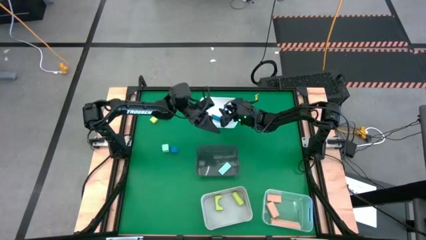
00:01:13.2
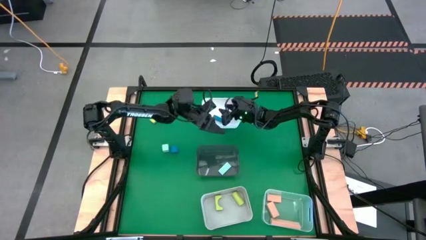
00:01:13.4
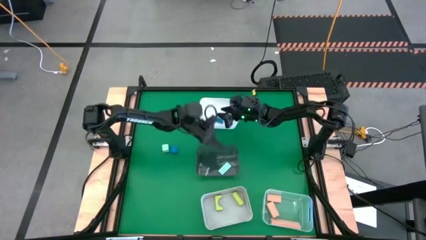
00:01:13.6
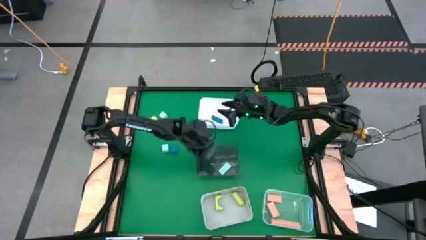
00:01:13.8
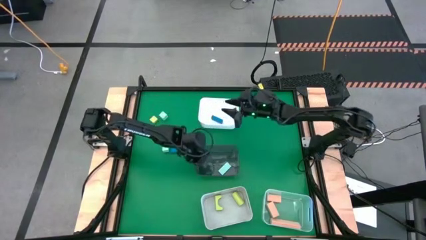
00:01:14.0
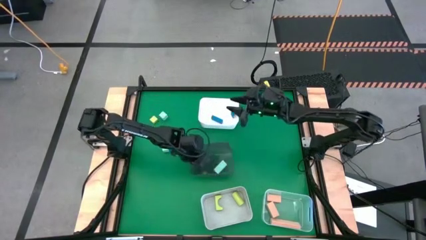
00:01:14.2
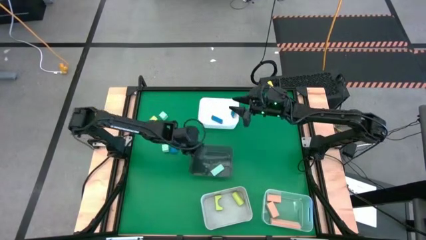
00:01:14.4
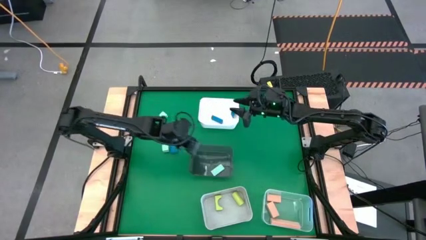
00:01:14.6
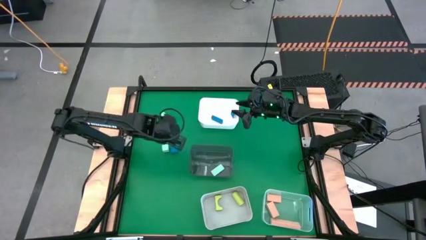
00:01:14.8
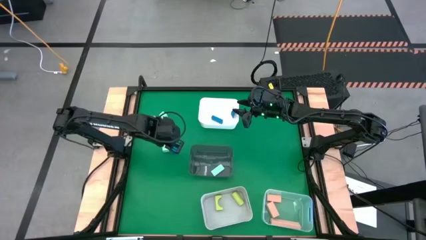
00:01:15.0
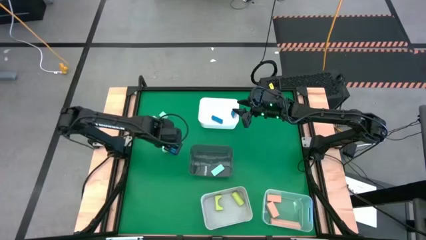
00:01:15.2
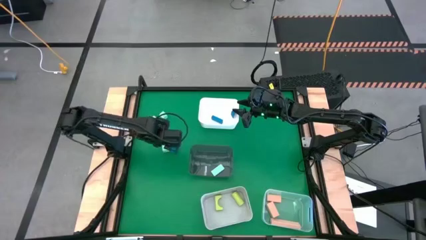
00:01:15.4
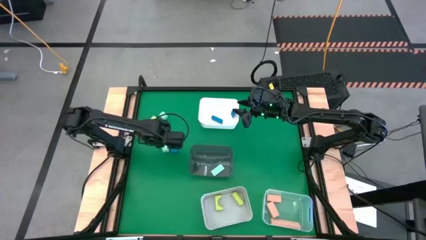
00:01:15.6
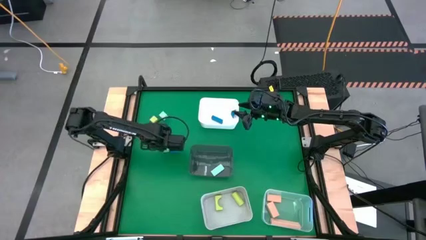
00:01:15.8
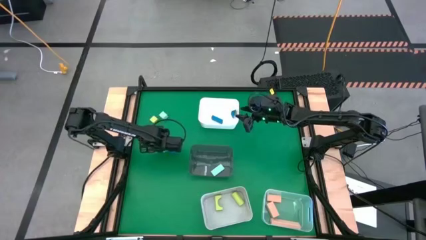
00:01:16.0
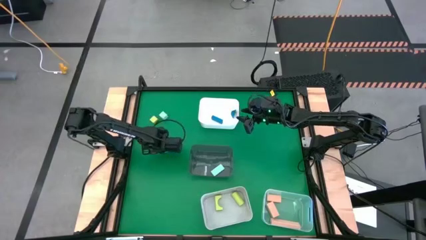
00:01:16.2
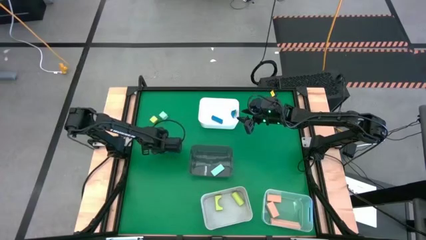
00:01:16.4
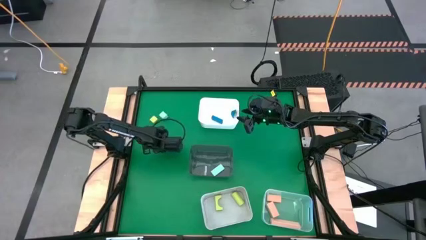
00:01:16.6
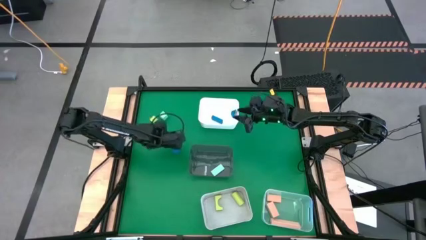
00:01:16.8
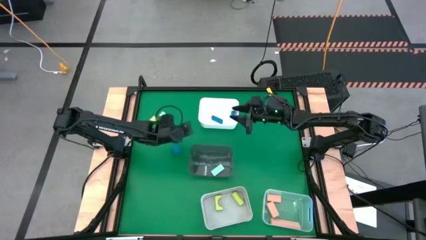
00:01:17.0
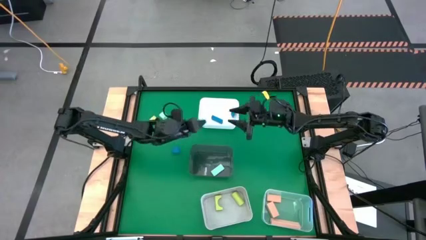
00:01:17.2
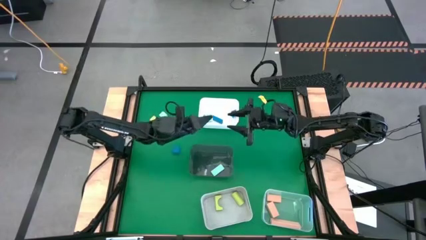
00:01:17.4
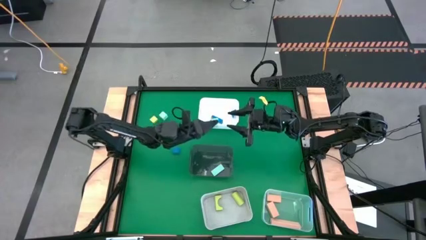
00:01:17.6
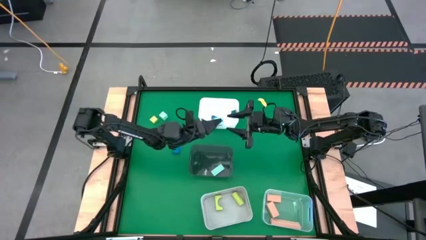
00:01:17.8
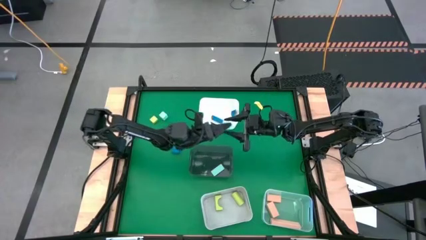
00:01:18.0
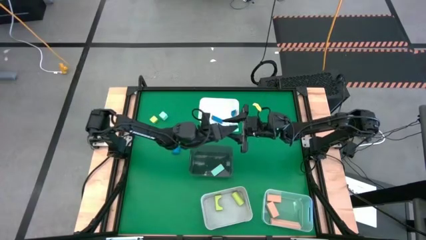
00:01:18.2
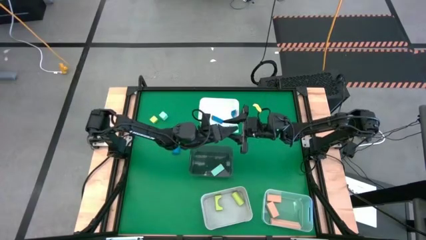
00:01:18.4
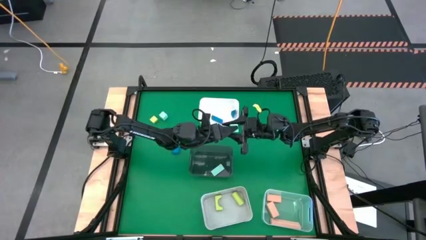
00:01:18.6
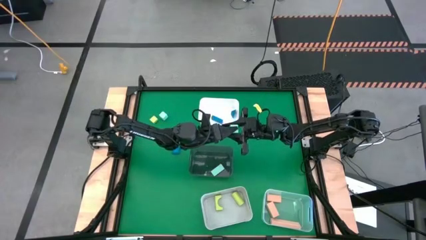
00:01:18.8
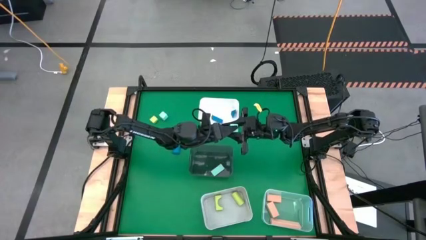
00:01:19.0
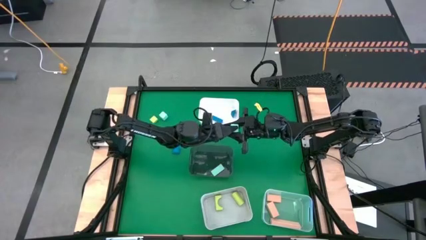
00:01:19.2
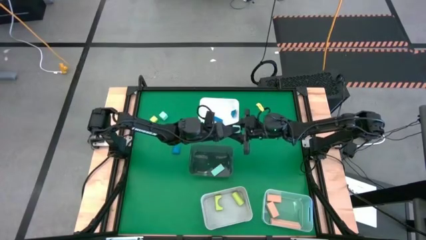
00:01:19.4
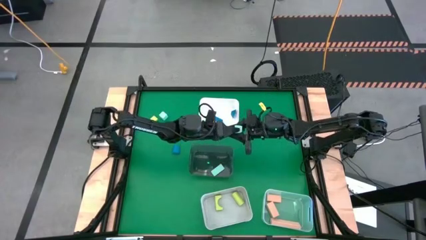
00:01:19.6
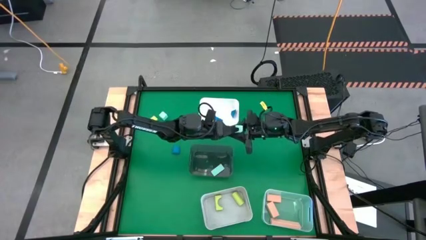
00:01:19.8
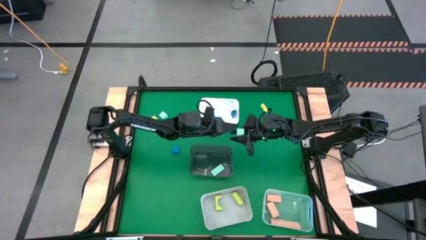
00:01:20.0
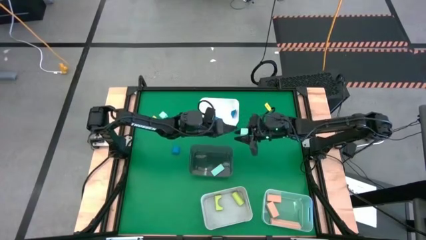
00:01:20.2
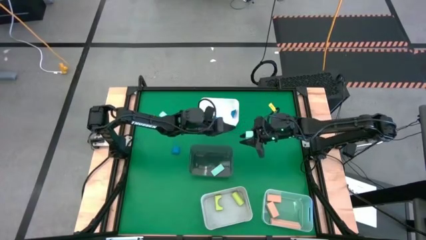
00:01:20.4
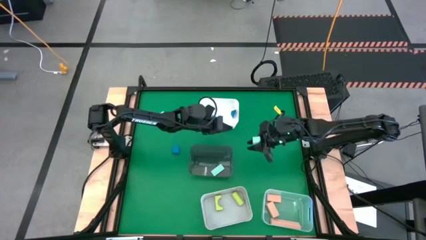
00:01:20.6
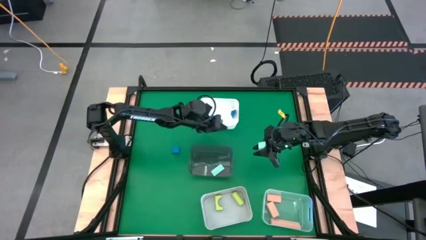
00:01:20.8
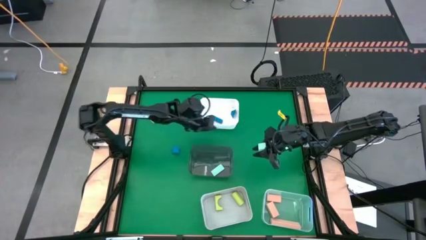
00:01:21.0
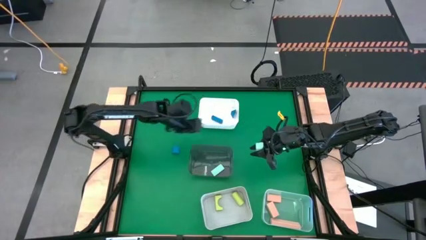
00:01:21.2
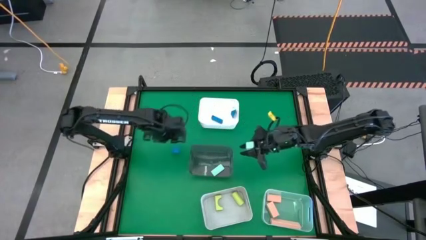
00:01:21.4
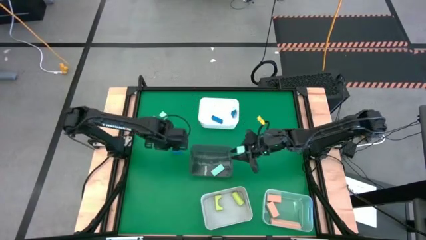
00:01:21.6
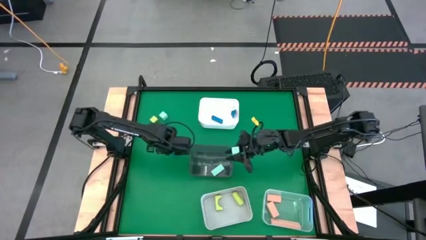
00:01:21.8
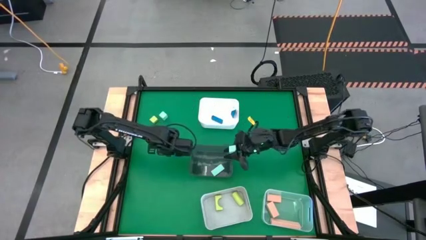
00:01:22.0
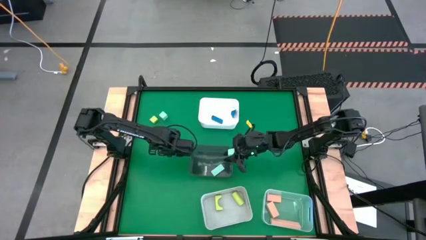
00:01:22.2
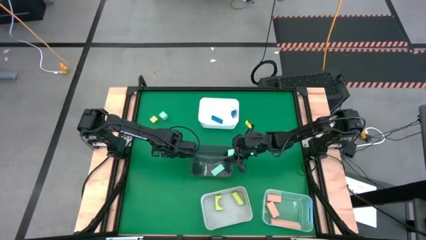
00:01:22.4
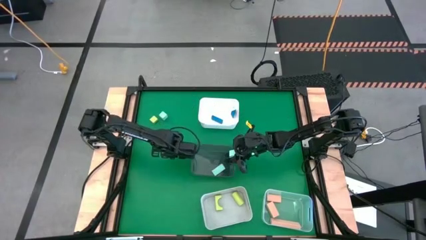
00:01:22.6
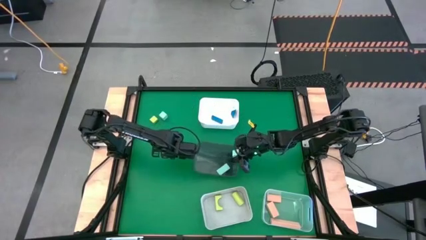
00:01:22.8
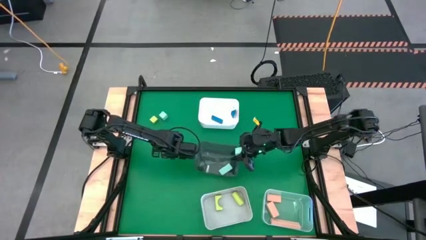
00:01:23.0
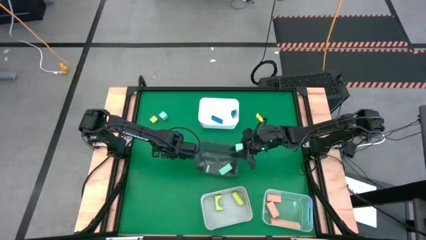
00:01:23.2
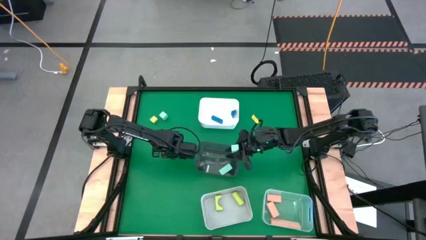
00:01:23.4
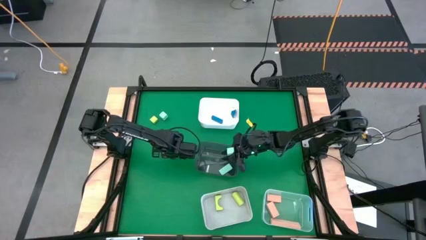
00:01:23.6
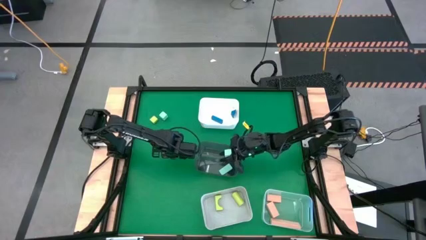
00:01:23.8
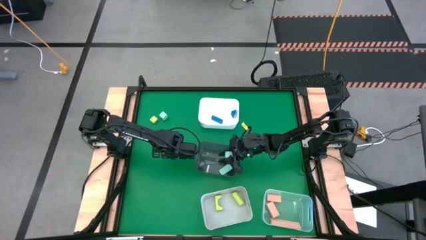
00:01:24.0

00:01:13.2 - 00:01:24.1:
Task: Sort & place blocks by color
Put the bottom light blue block into the black bin

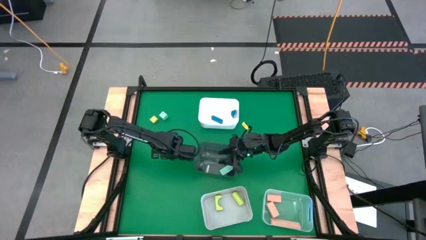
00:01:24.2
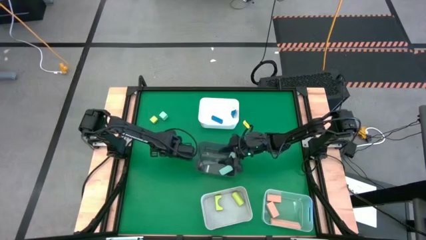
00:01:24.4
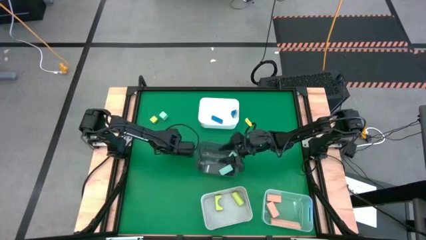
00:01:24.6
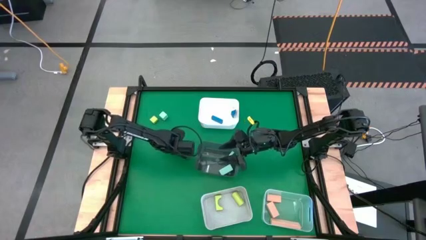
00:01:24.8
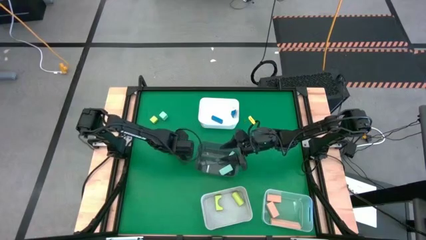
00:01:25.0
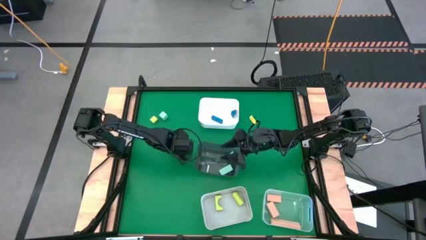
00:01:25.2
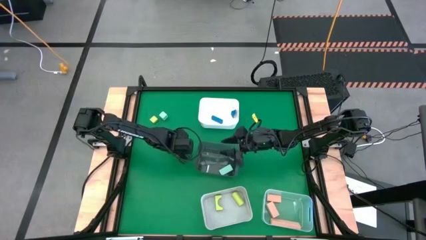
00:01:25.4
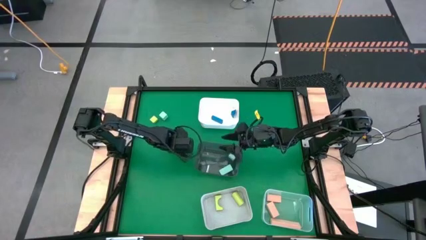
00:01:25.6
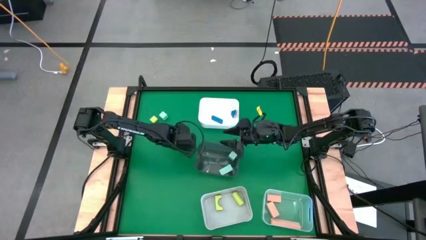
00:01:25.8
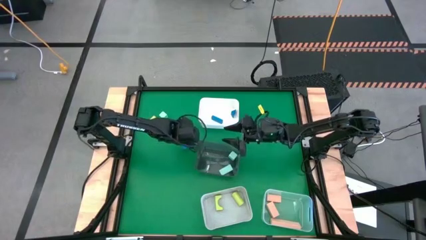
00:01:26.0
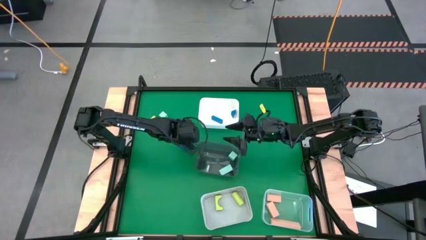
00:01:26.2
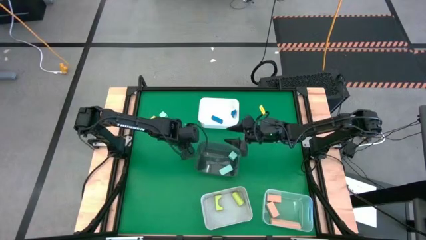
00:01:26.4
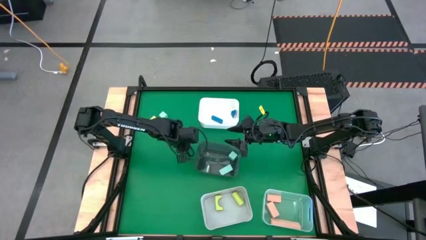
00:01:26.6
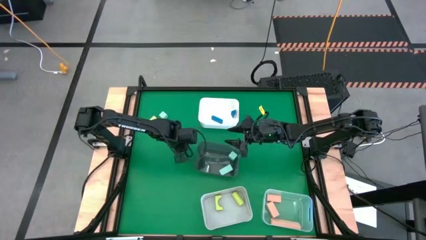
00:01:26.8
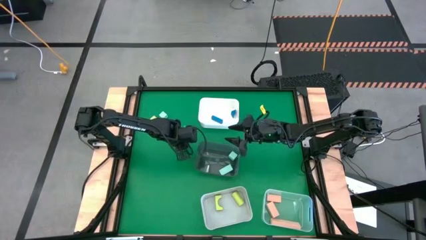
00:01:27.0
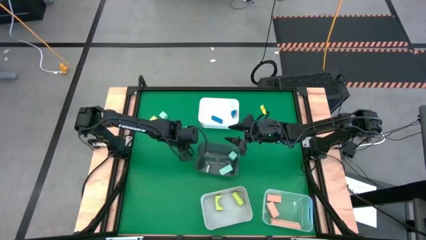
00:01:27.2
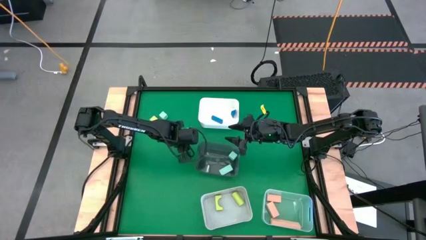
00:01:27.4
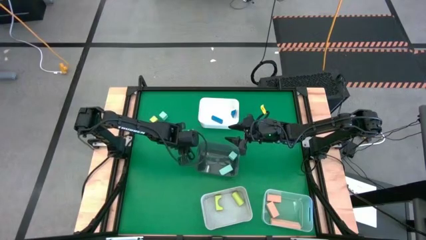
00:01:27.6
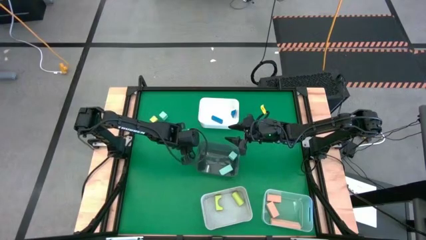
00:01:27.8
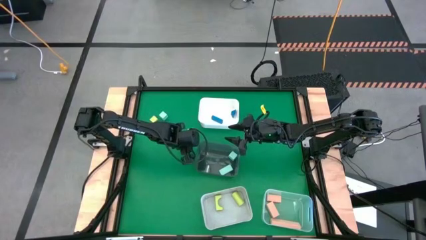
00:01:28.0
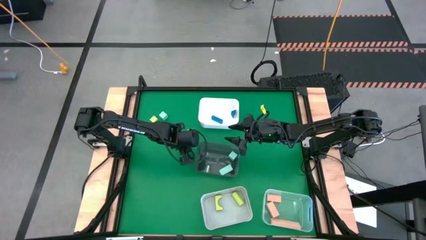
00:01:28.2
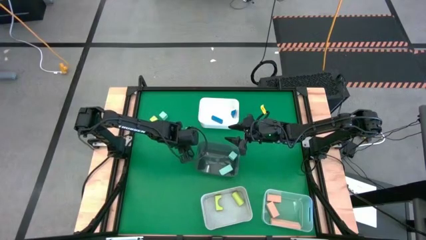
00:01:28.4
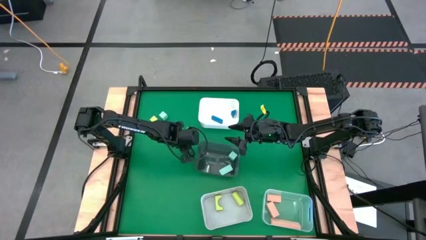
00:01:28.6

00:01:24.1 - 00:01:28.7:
Put the blue block into the white bin
